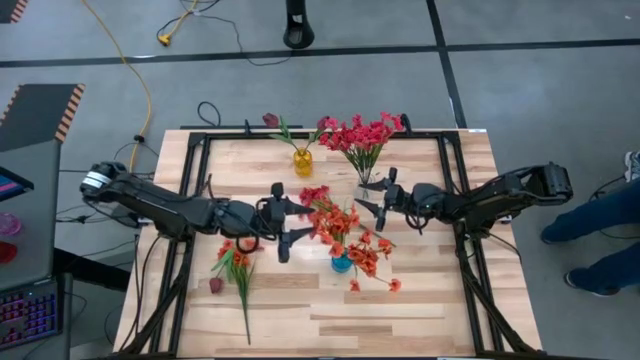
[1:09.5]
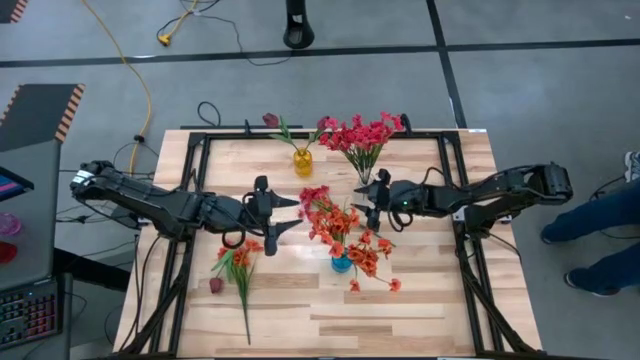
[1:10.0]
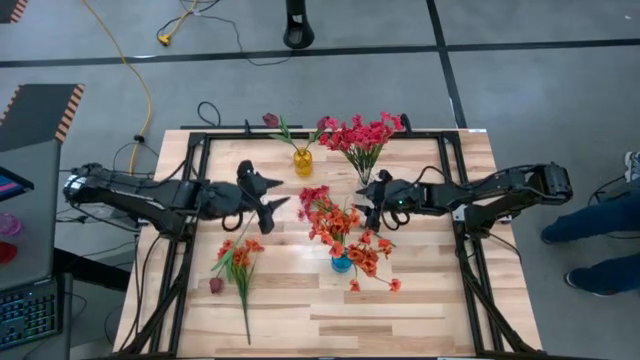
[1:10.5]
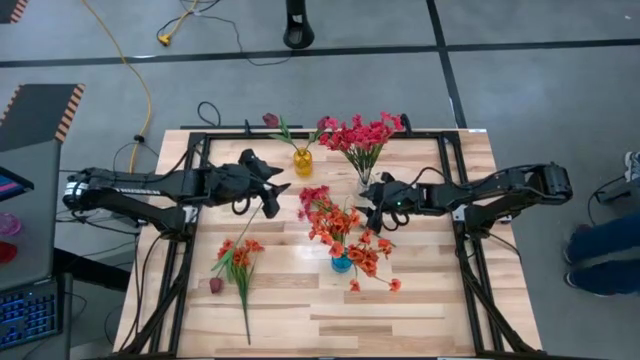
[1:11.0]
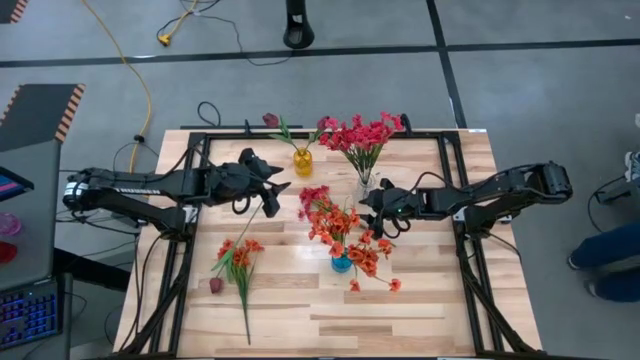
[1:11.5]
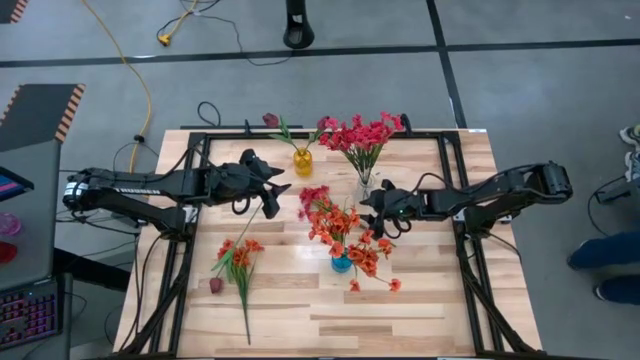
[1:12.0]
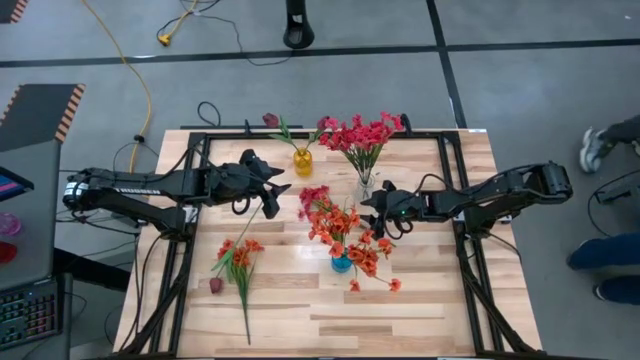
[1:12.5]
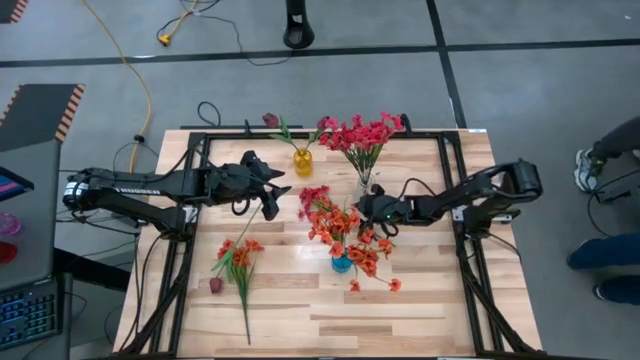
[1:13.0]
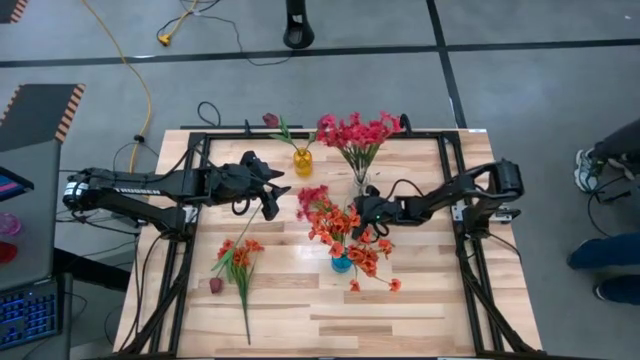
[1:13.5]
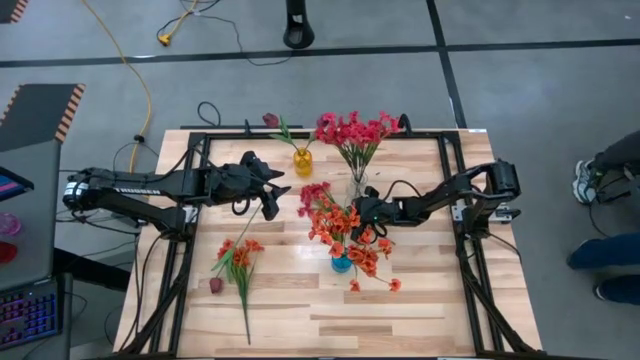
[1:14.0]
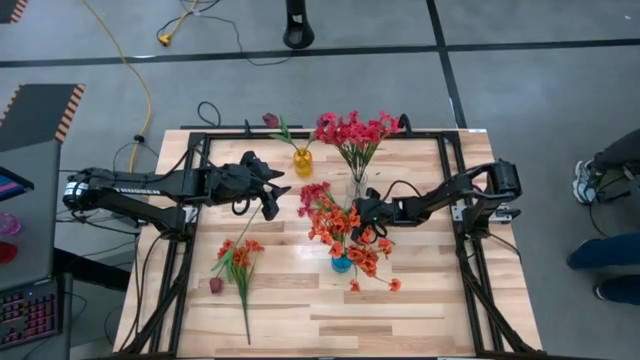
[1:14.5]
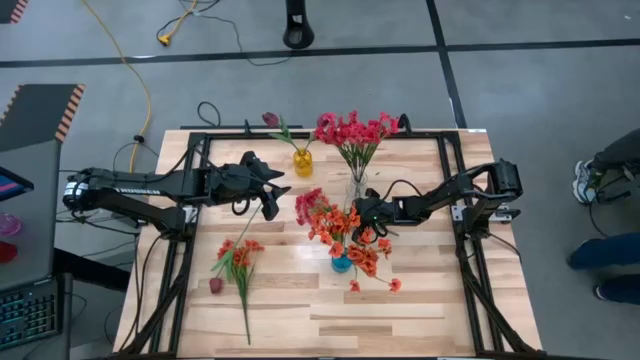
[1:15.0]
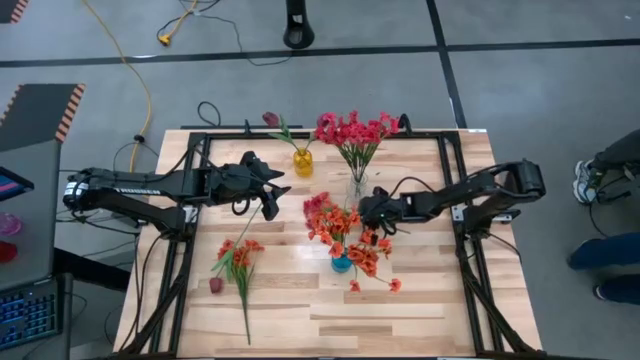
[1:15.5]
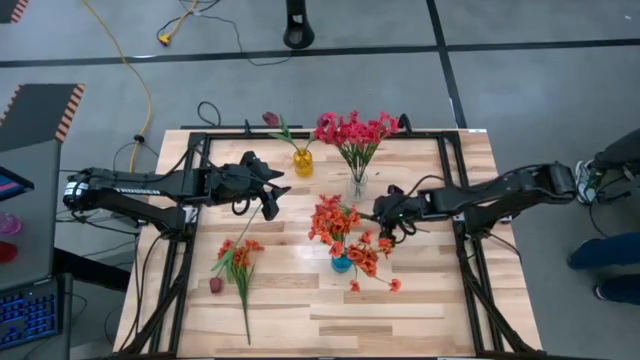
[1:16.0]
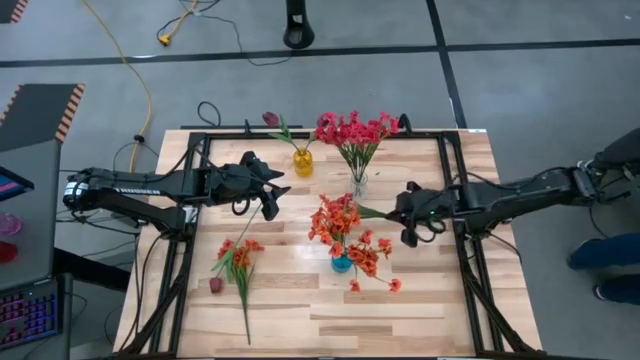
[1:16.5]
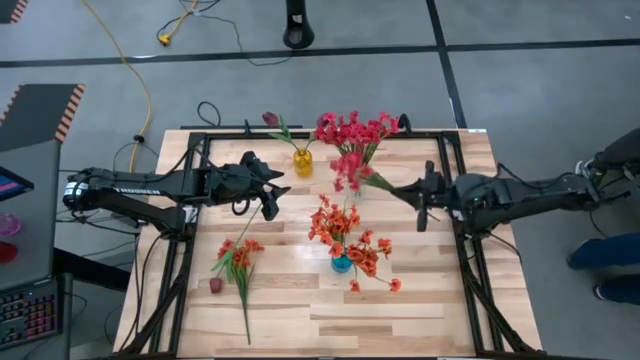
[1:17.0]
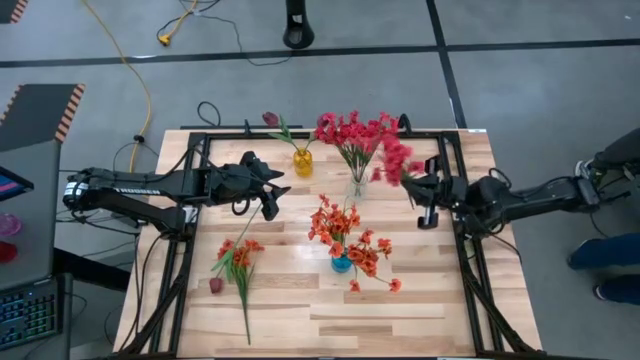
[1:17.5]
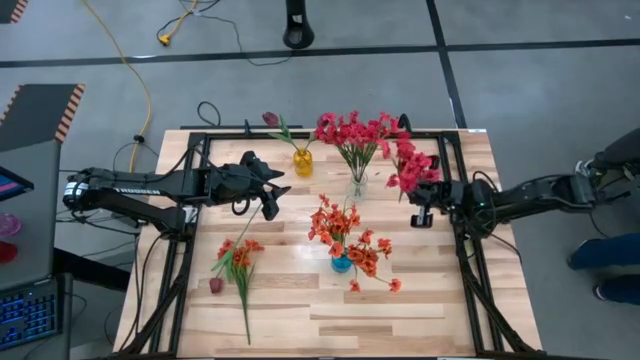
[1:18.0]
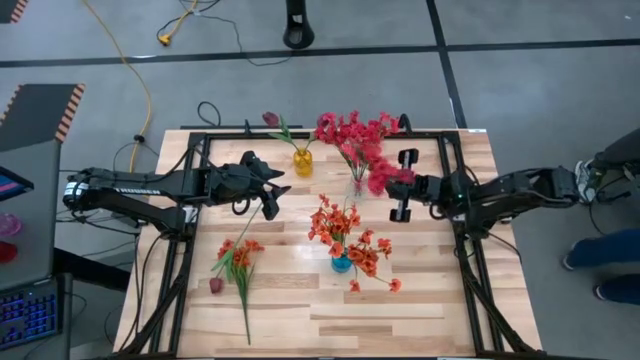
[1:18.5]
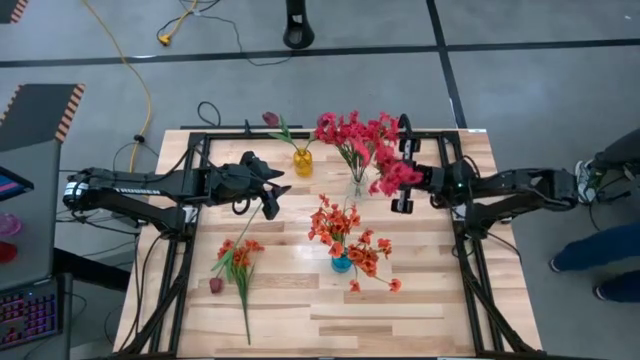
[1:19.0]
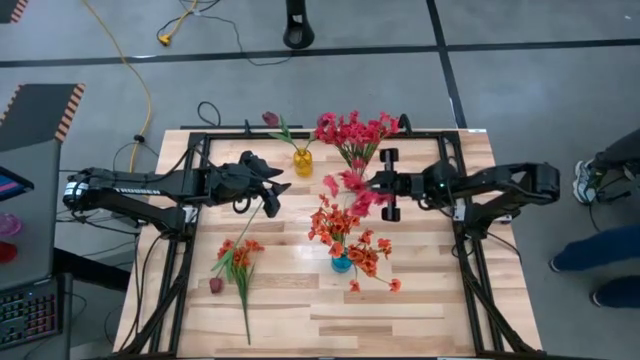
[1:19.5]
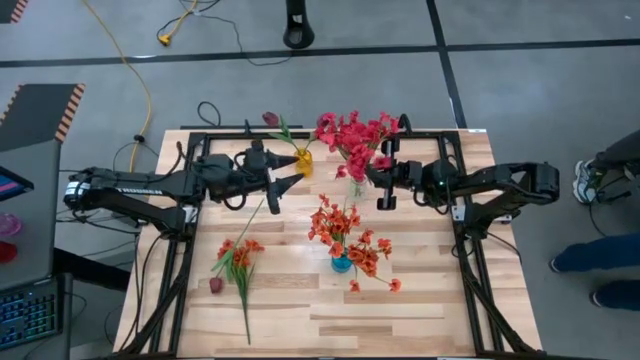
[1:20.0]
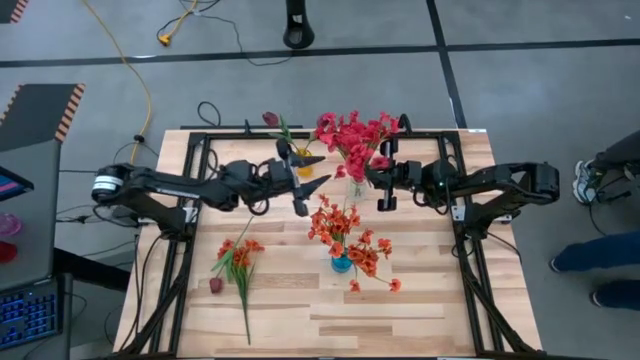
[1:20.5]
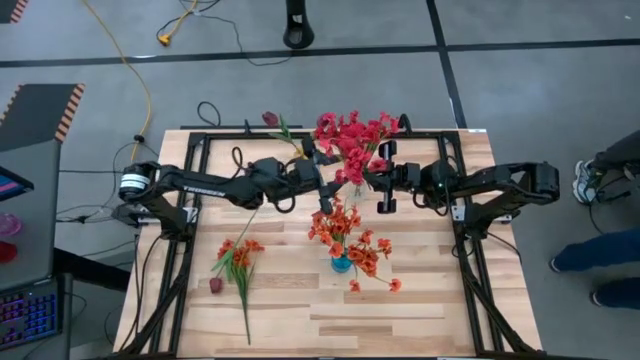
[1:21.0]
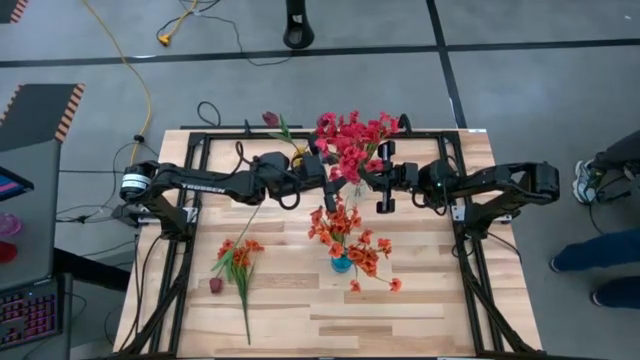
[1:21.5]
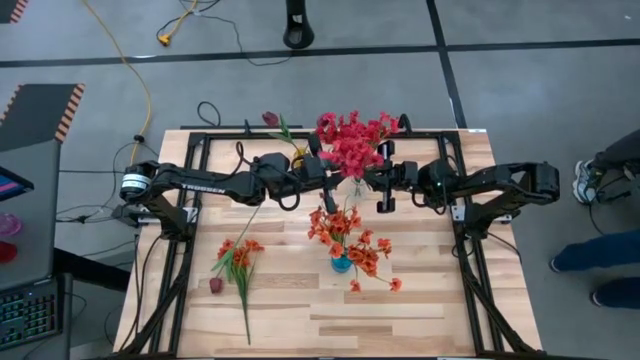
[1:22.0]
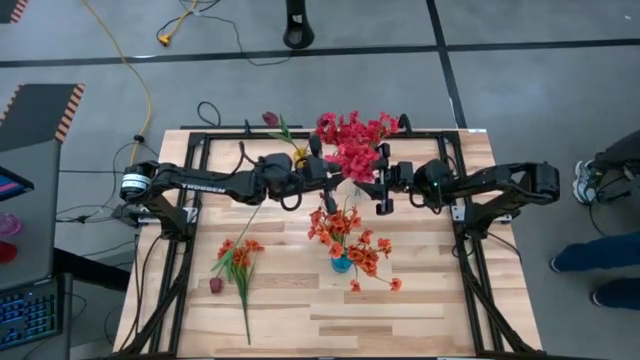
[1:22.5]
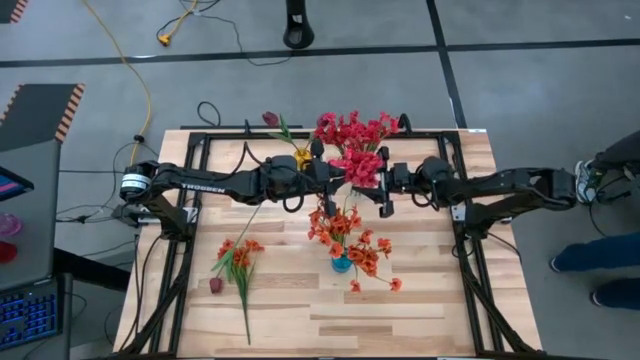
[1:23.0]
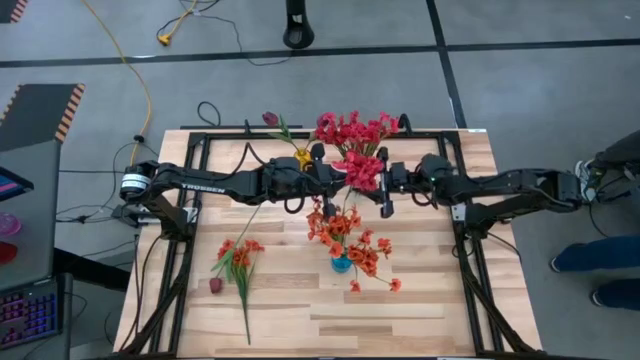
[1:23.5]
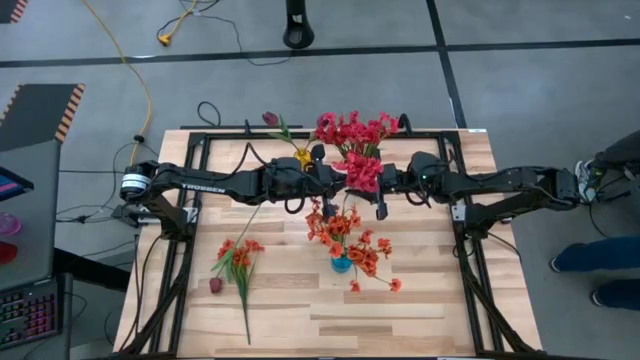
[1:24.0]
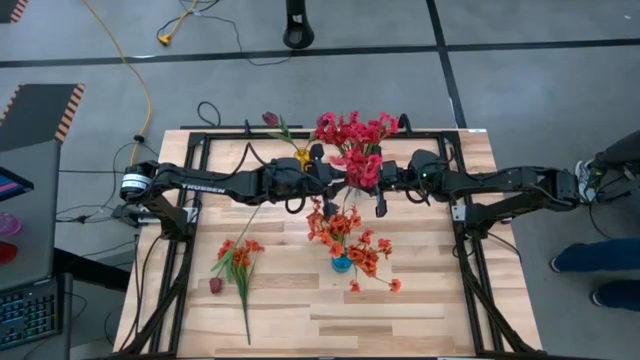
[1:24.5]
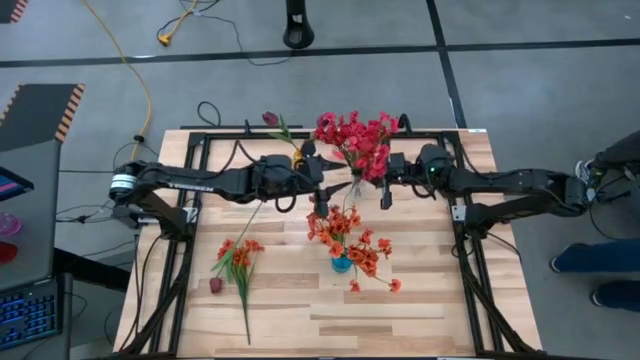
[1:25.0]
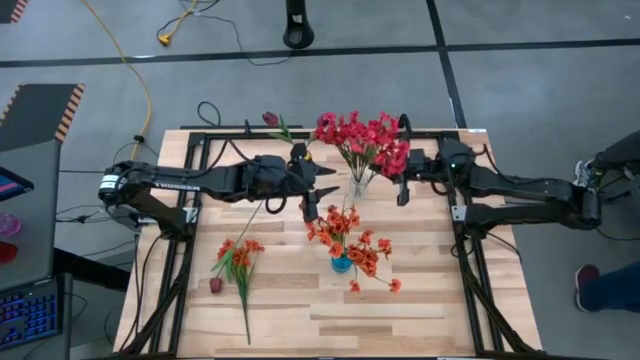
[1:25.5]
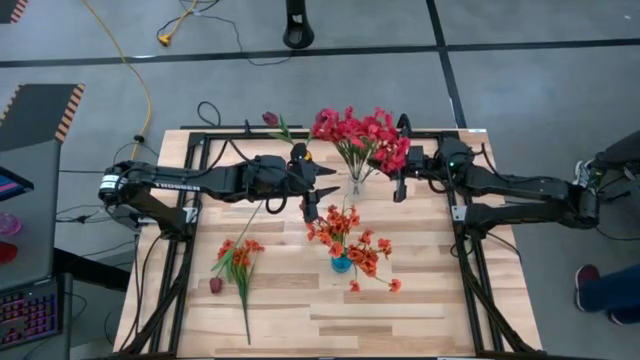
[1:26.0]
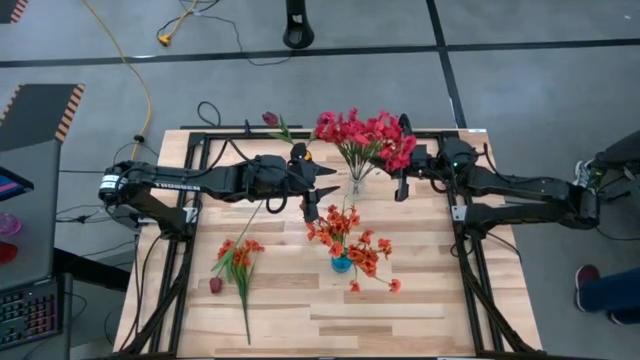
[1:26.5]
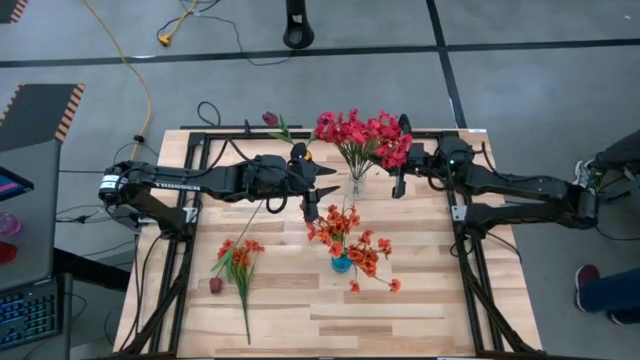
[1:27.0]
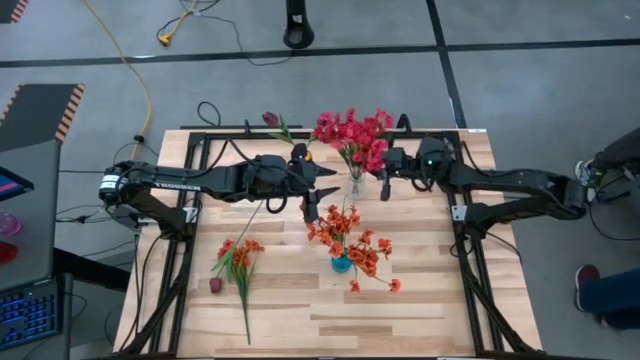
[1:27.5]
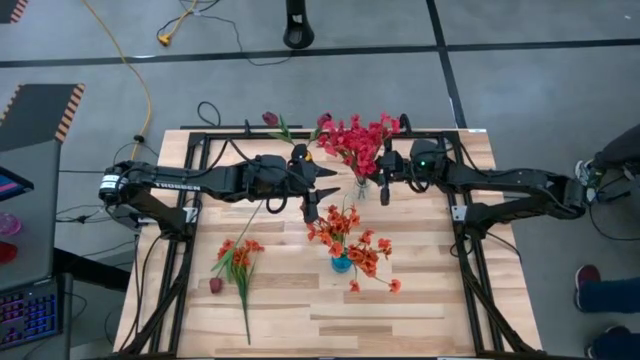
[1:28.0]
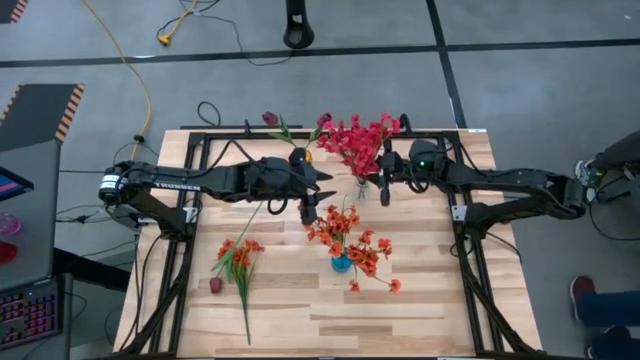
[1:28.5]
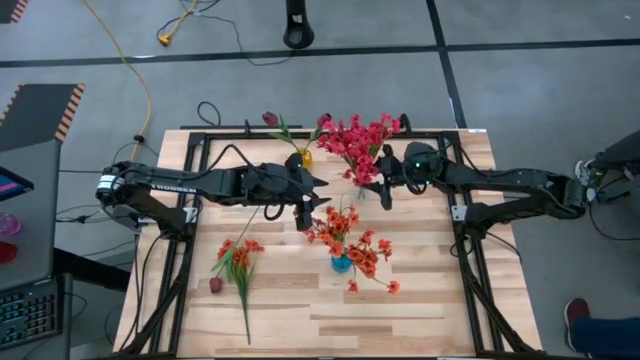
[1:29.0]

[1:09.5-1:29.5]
Task: Sort flowers into vase by color
Put the red flowers into the transparent vase
